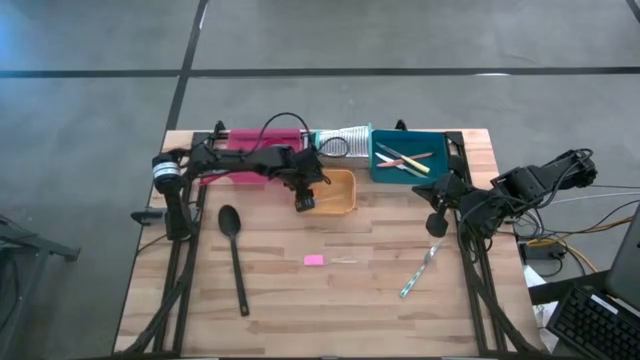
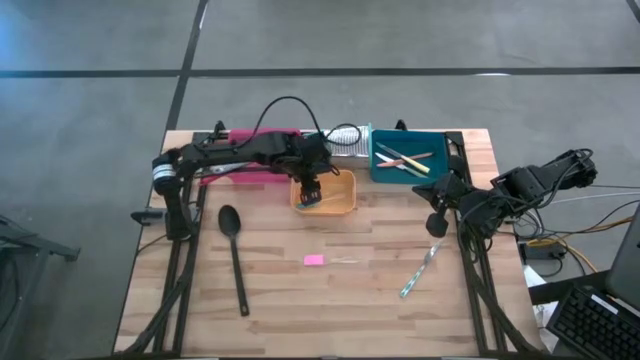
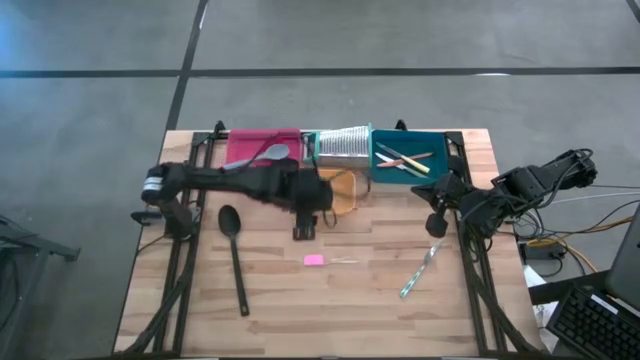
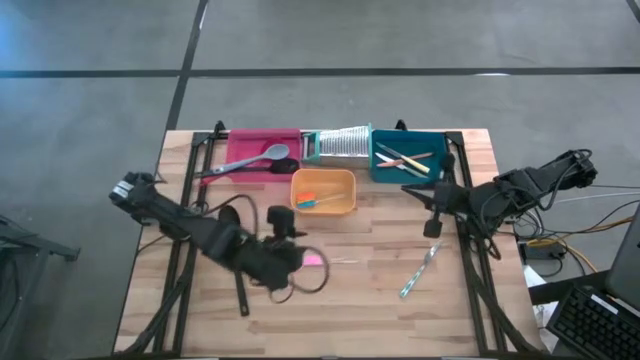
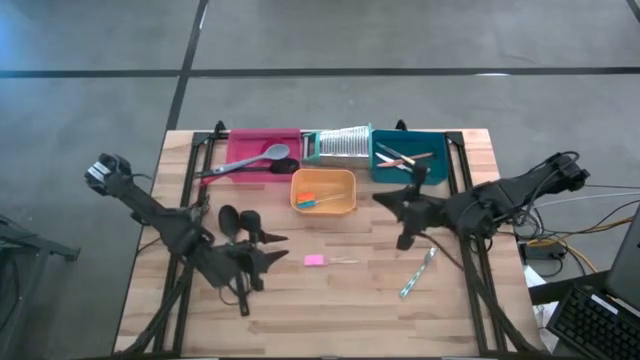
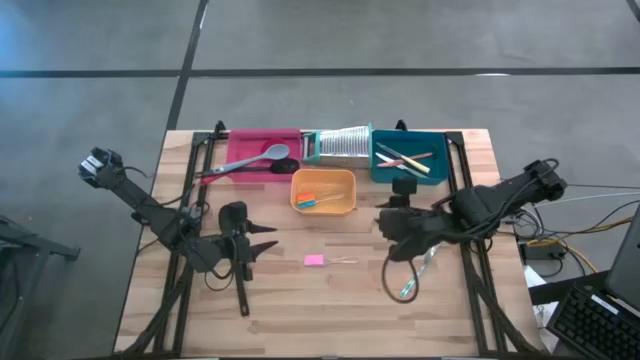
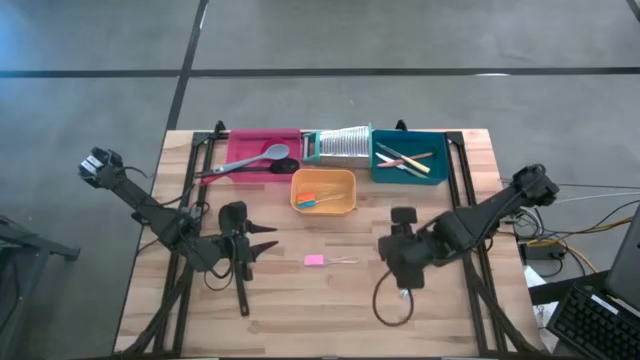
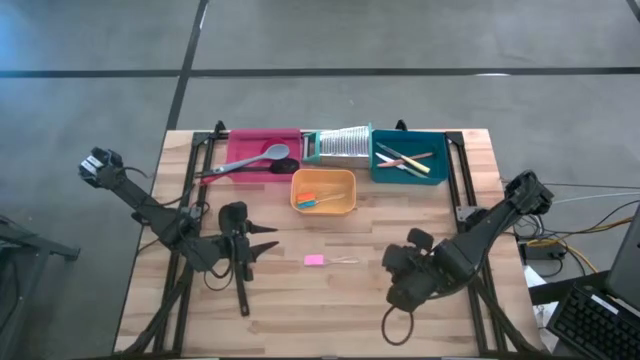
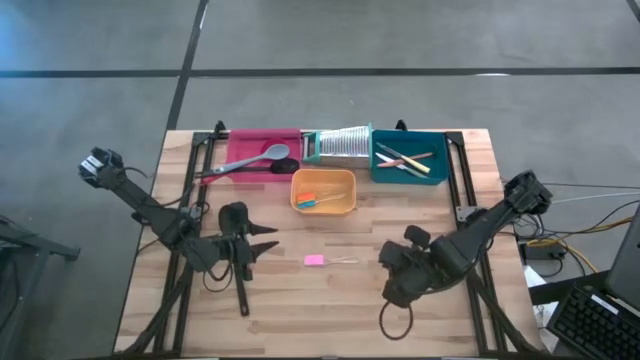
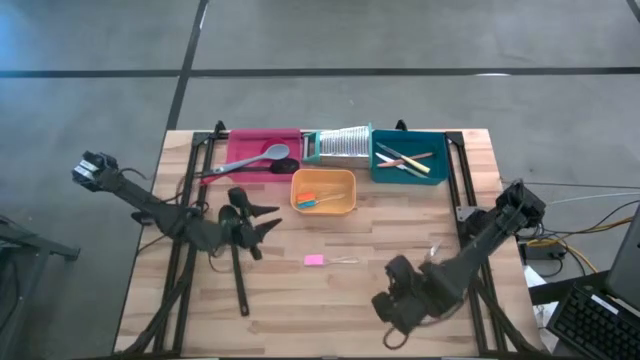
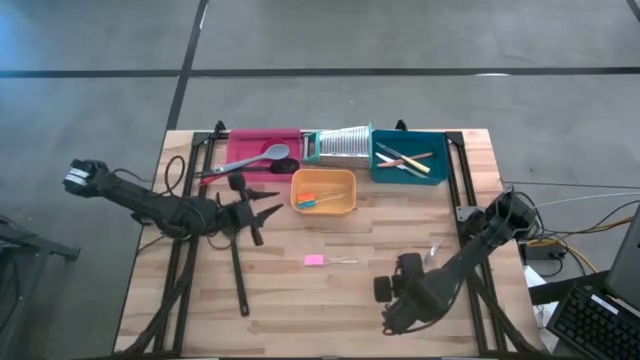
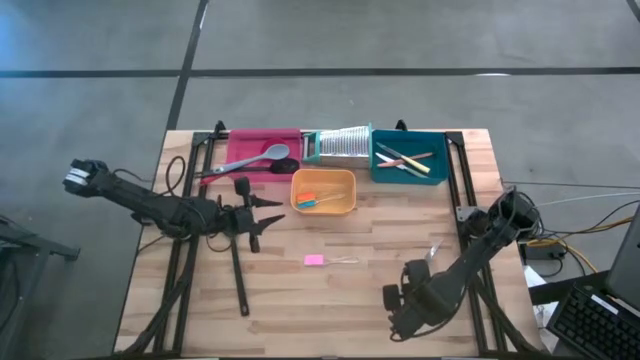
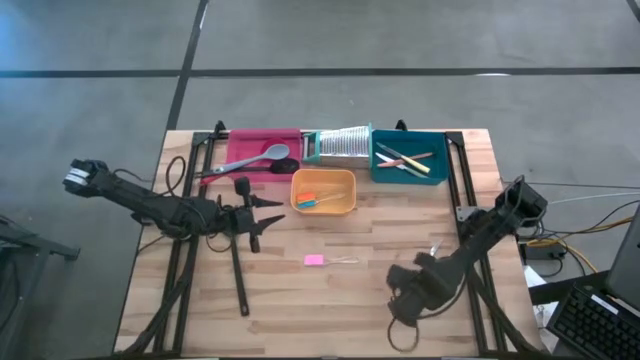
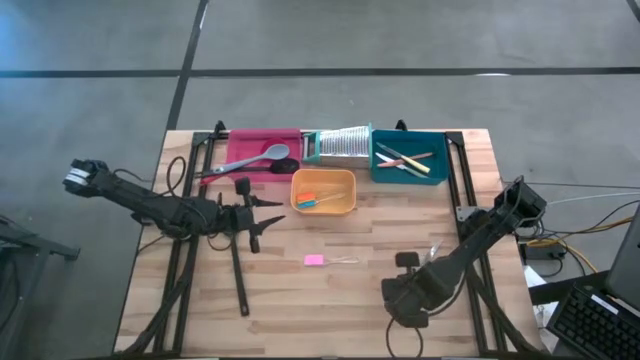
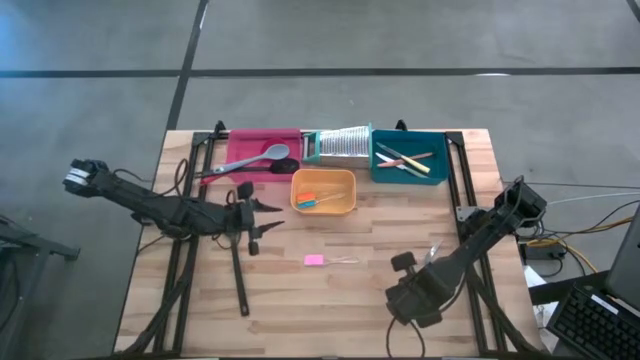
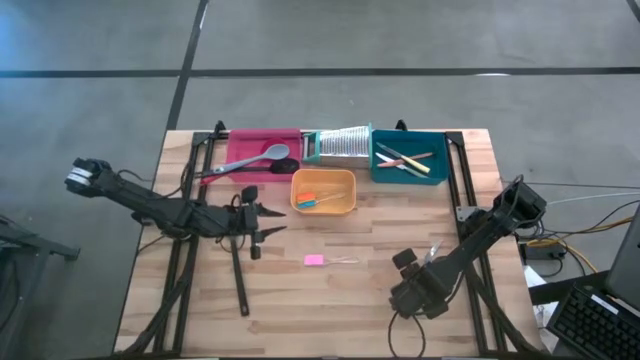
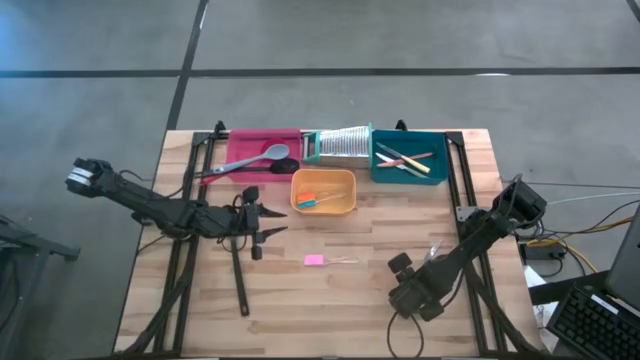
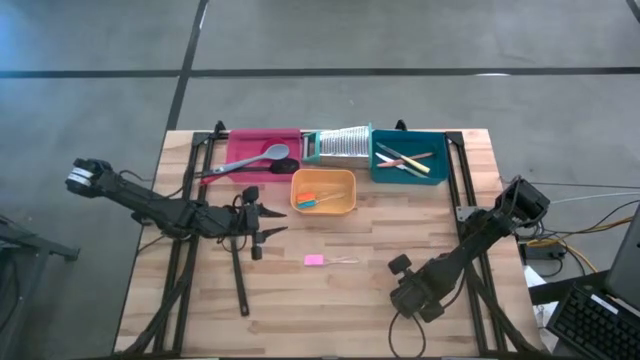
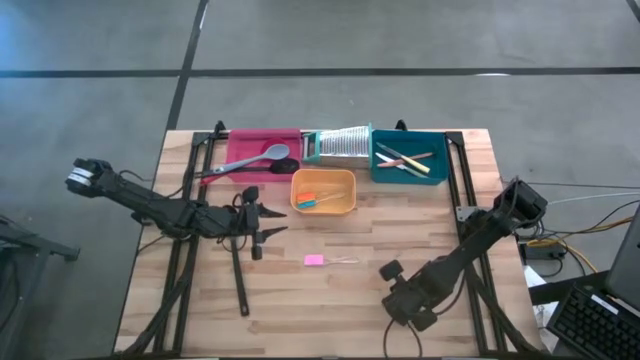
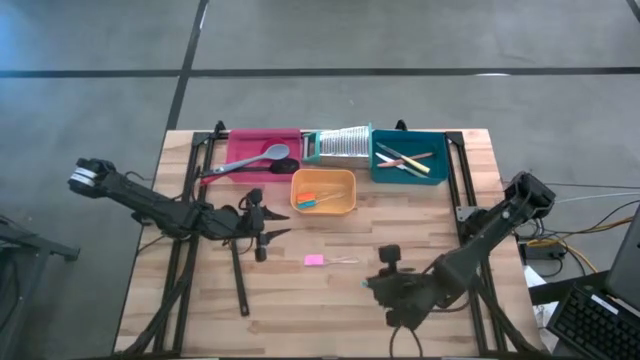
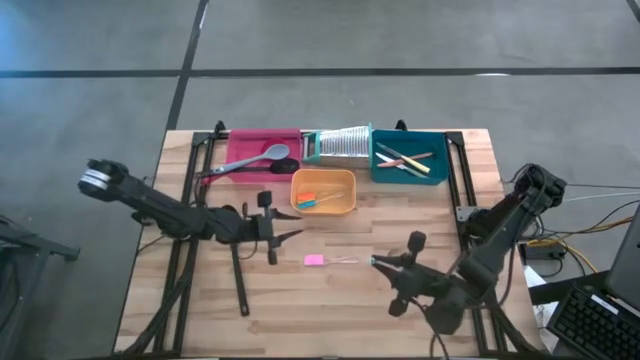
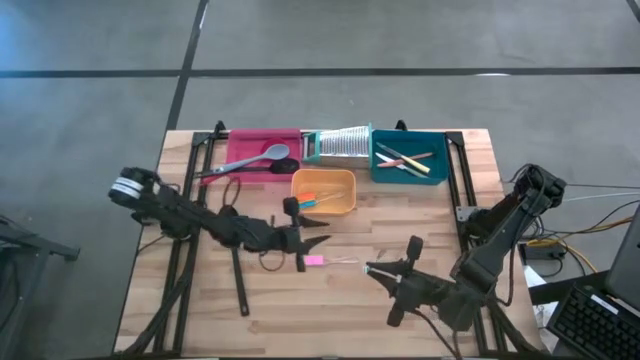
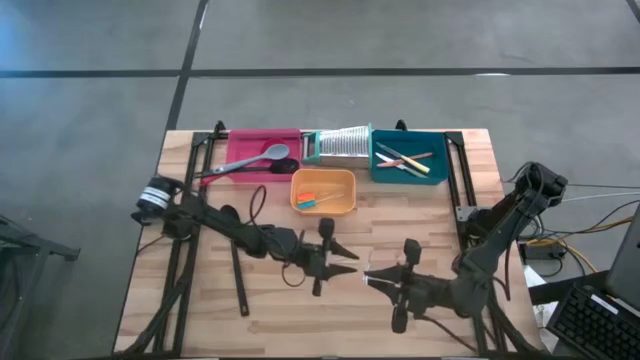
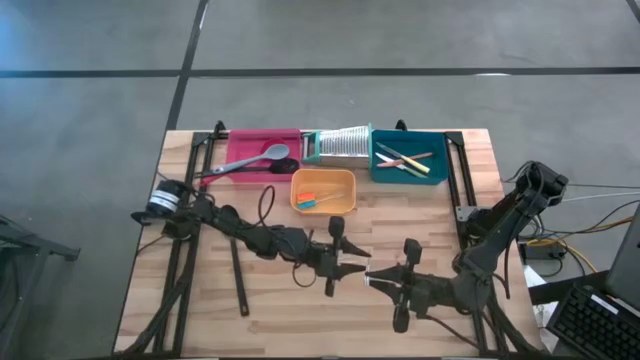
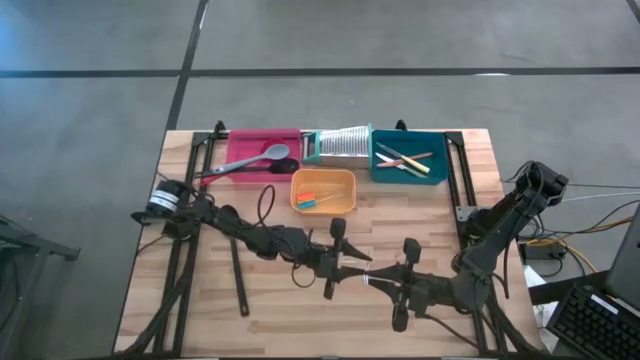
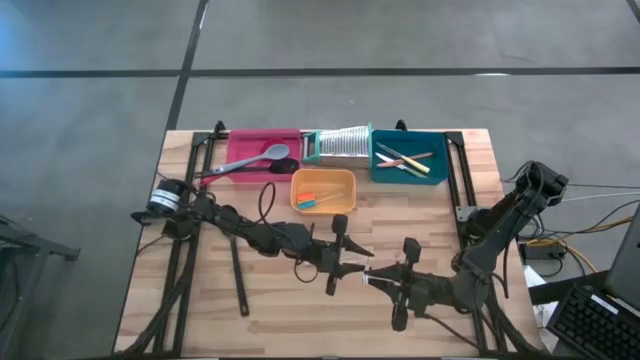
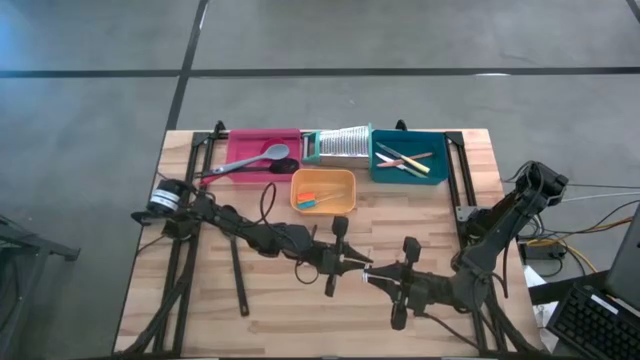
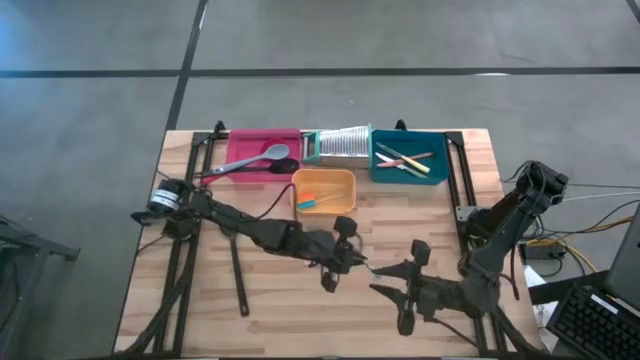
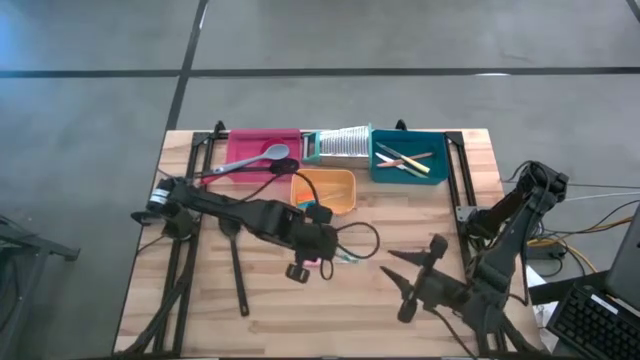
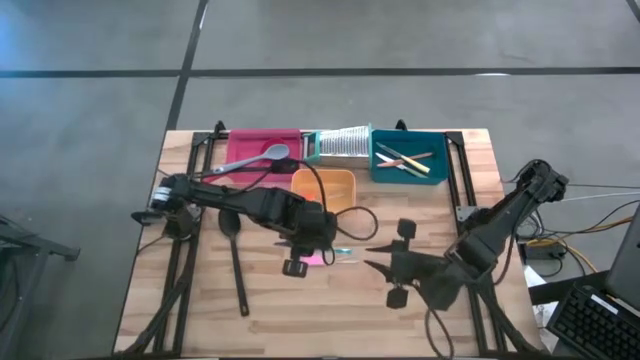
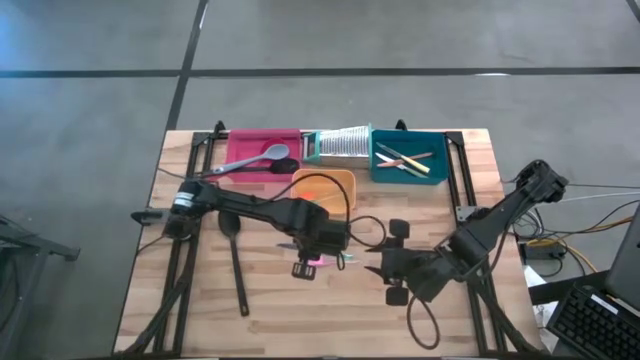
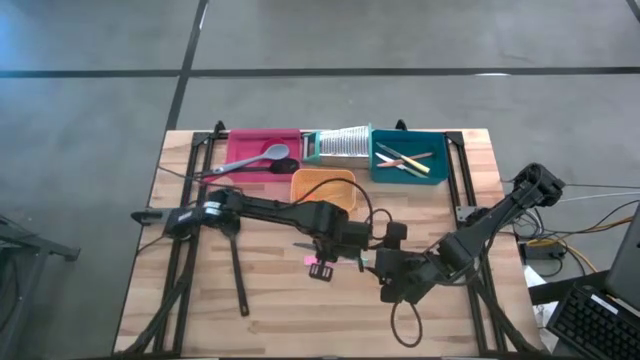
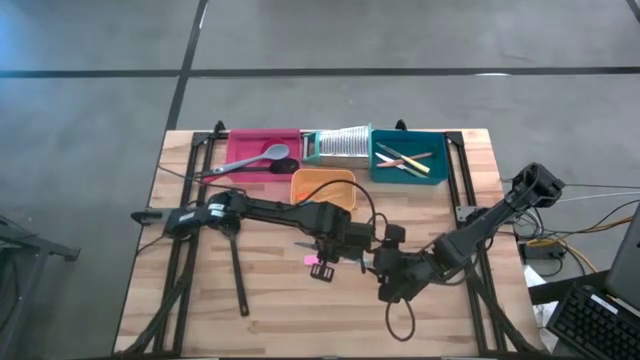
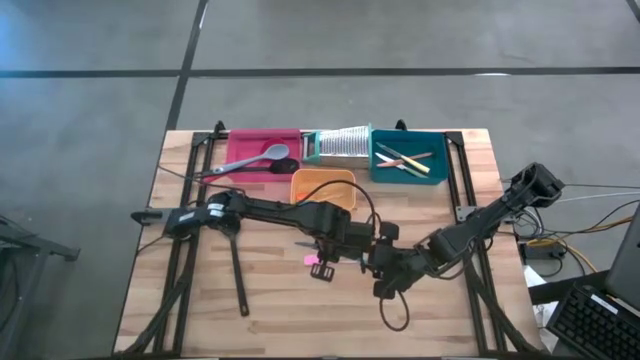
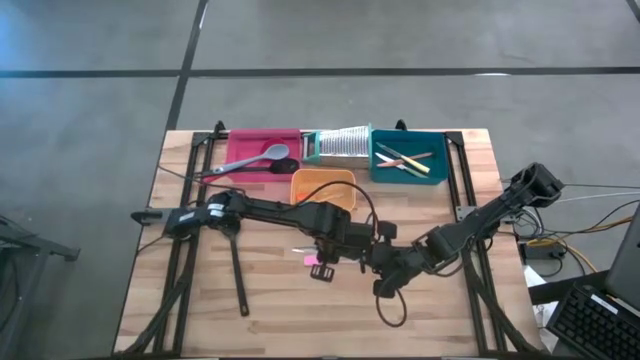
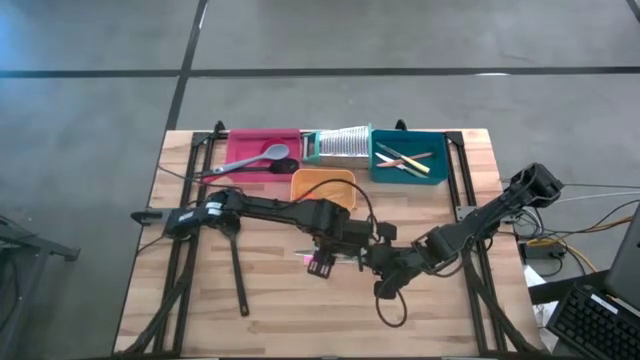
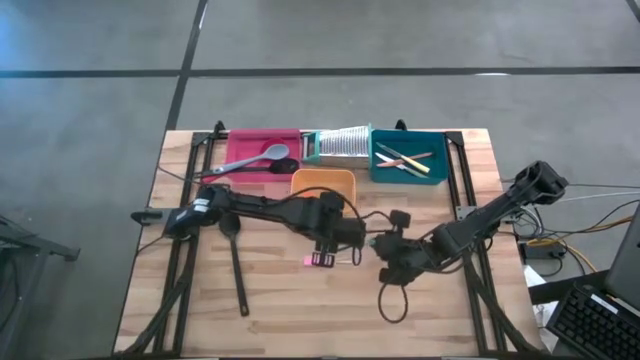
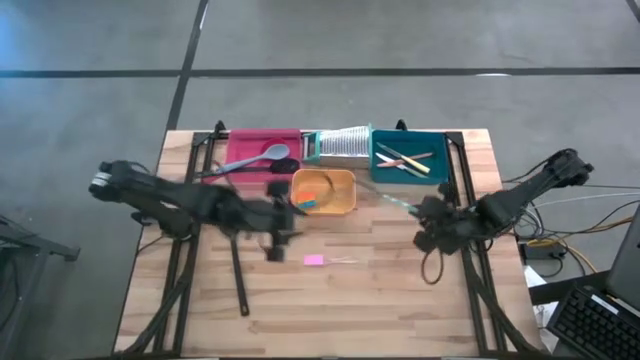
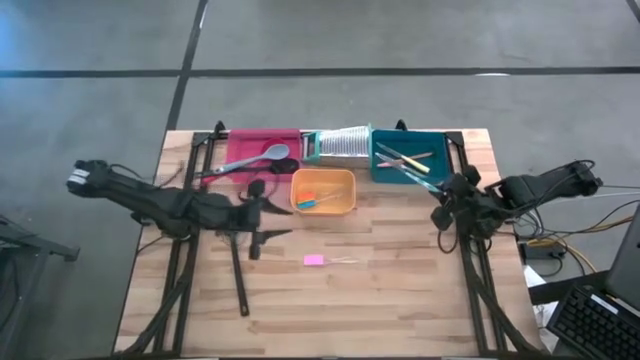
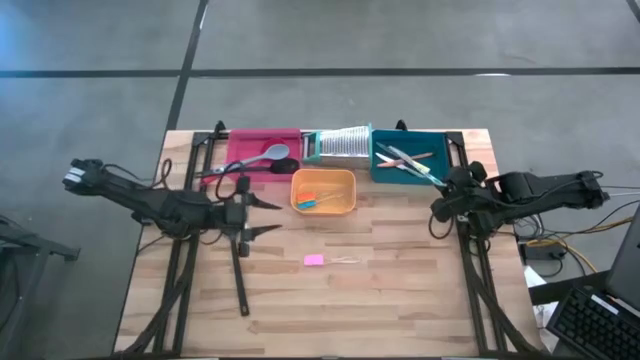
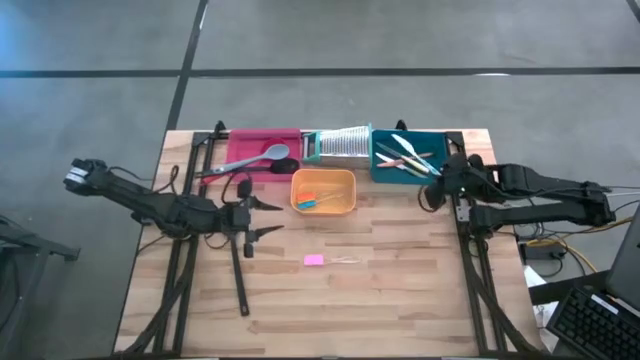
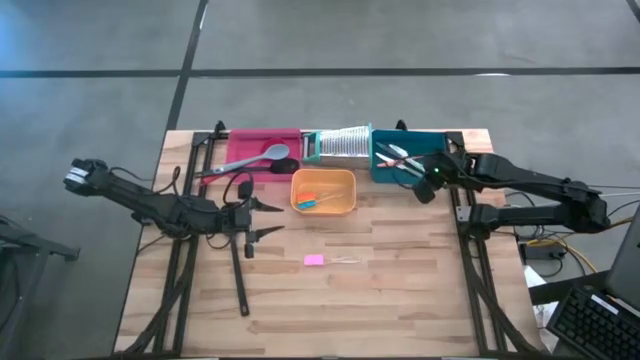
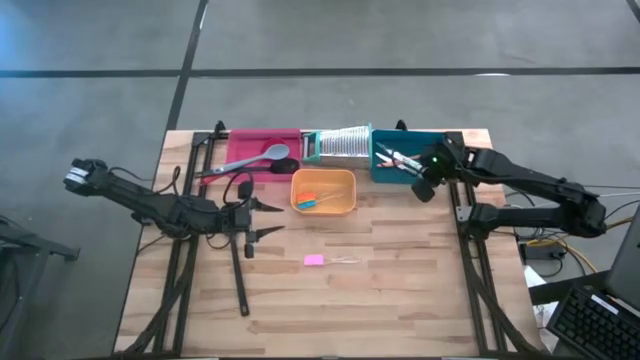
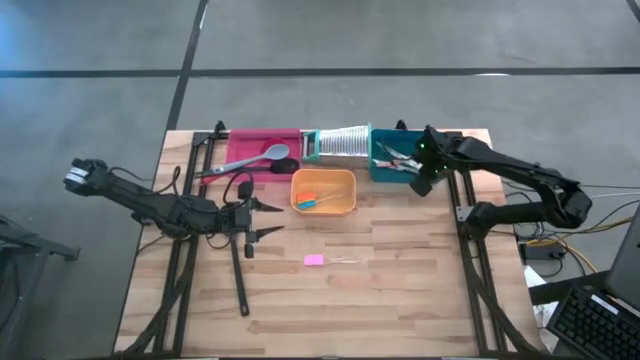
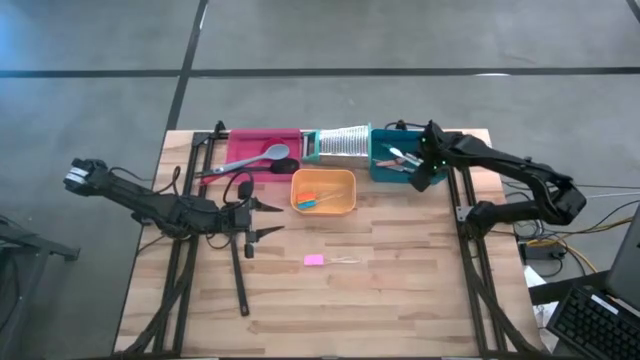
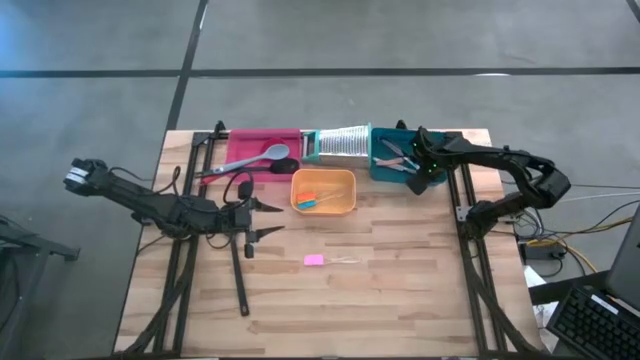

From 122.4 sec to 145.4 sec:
Task: Pick & Place Kitchen Items
Put the blue patterned knife into the blue bin
